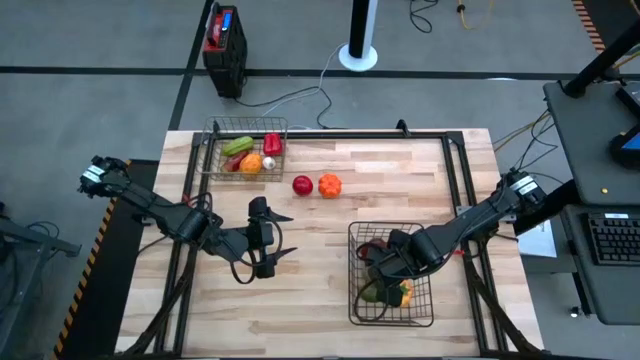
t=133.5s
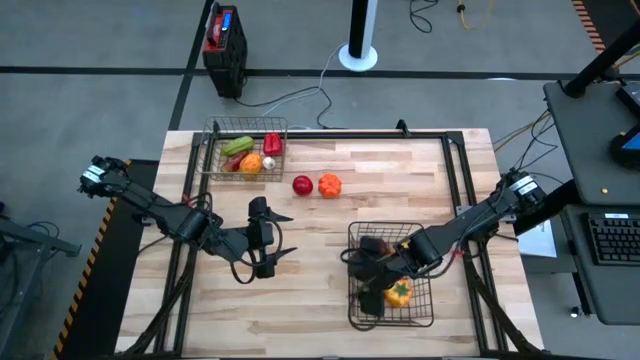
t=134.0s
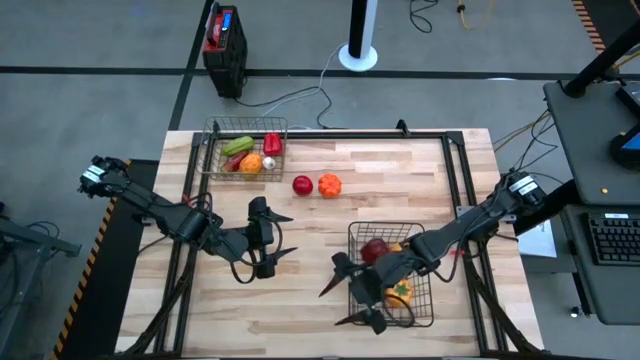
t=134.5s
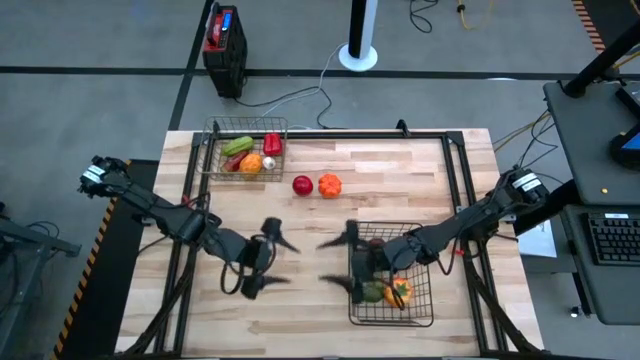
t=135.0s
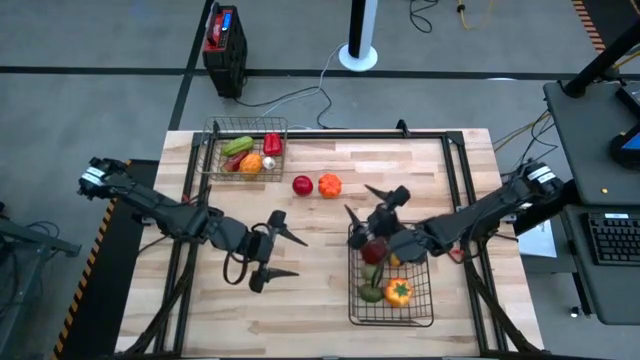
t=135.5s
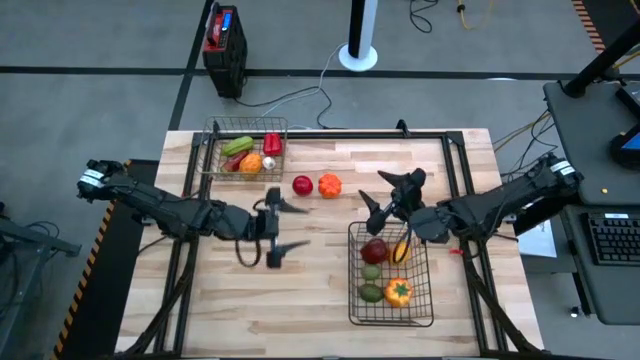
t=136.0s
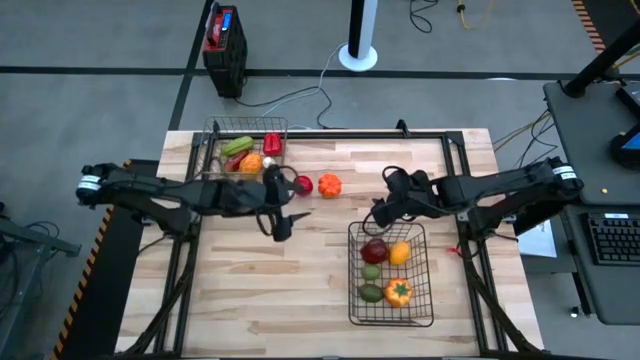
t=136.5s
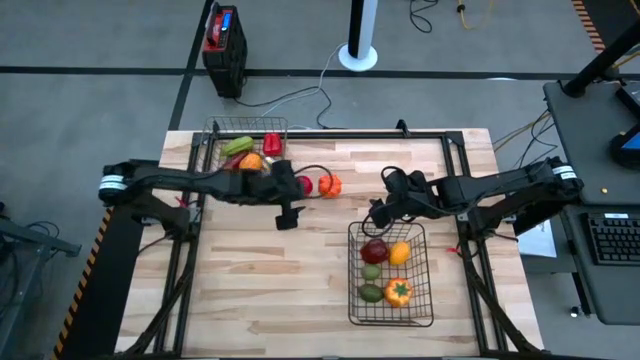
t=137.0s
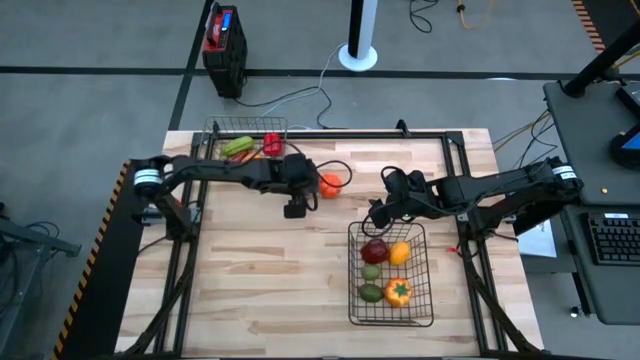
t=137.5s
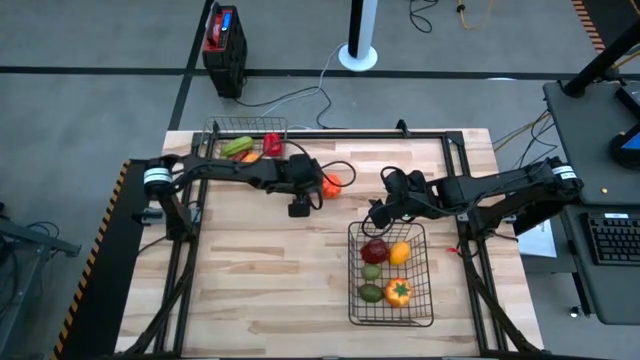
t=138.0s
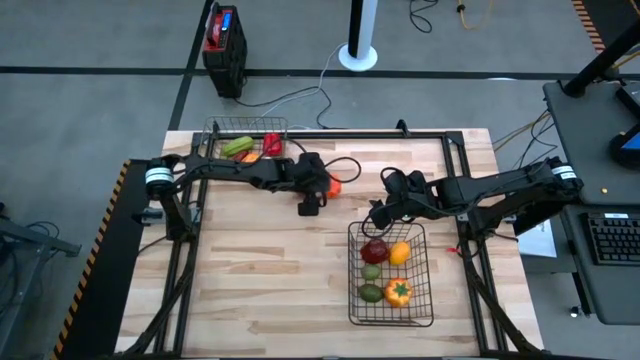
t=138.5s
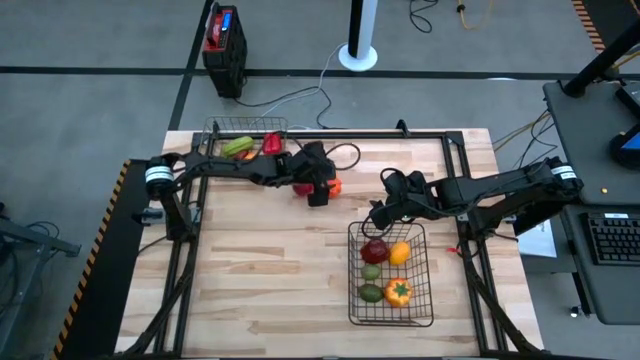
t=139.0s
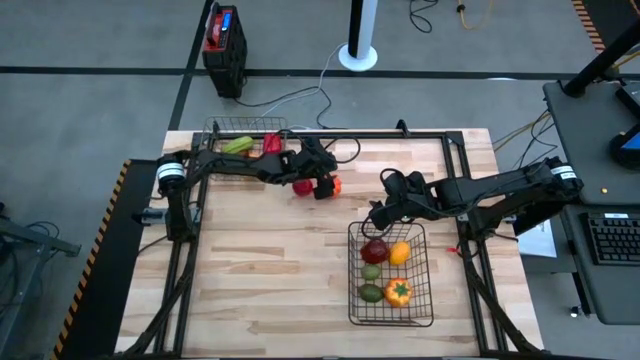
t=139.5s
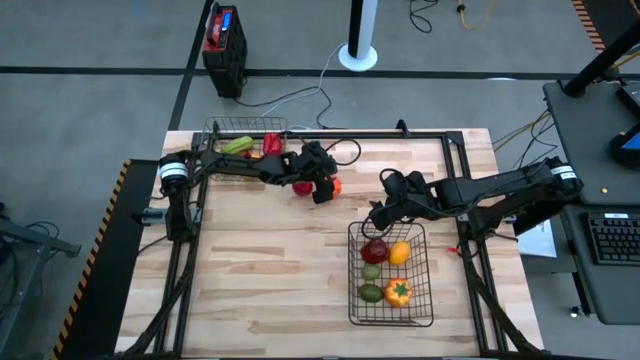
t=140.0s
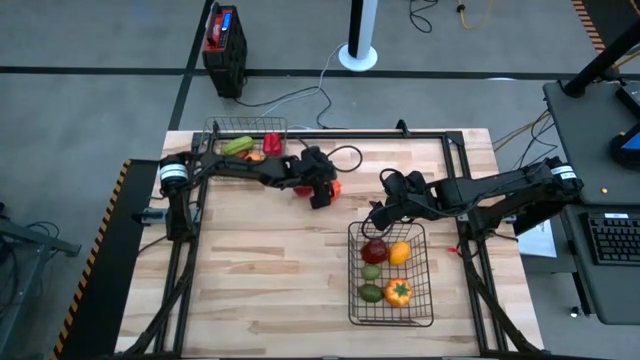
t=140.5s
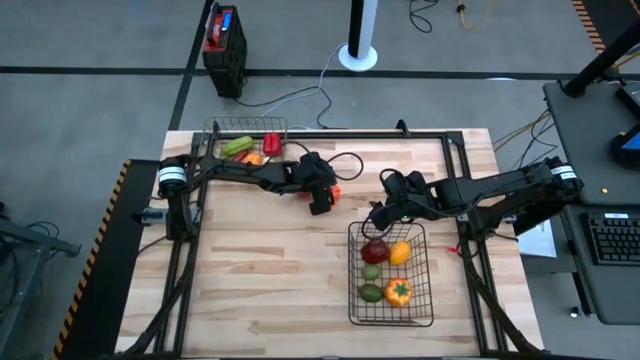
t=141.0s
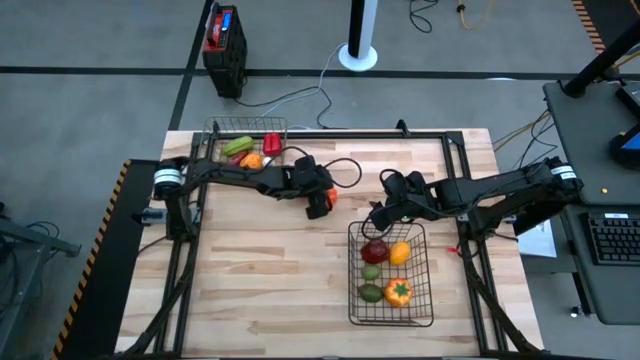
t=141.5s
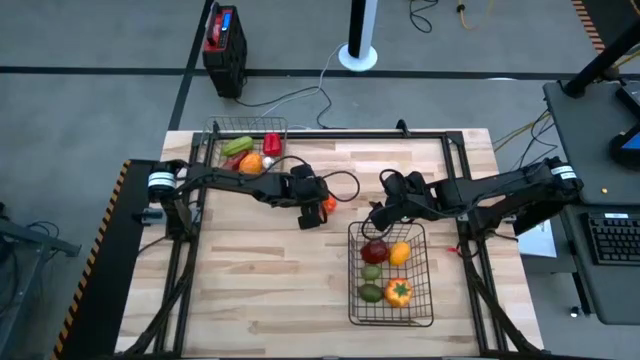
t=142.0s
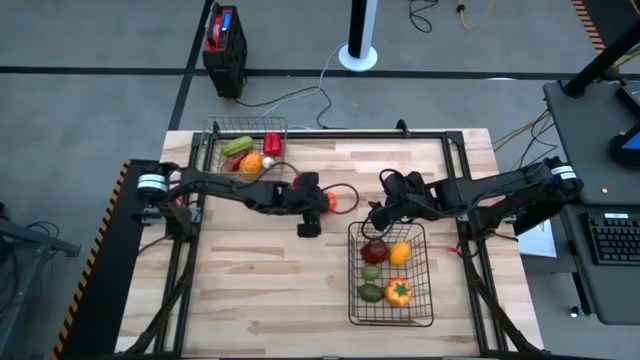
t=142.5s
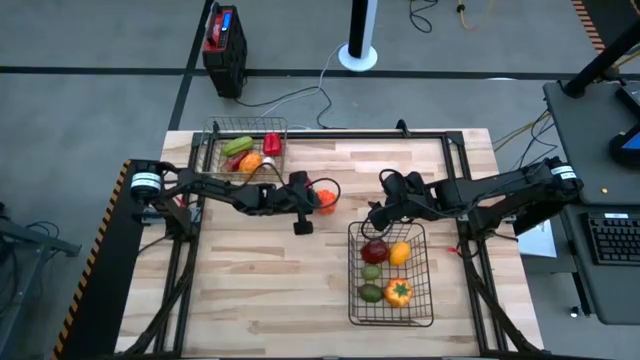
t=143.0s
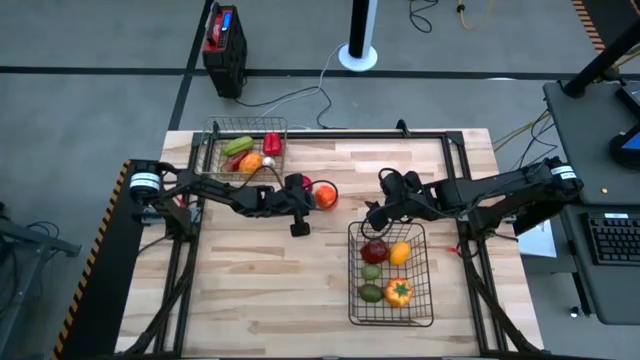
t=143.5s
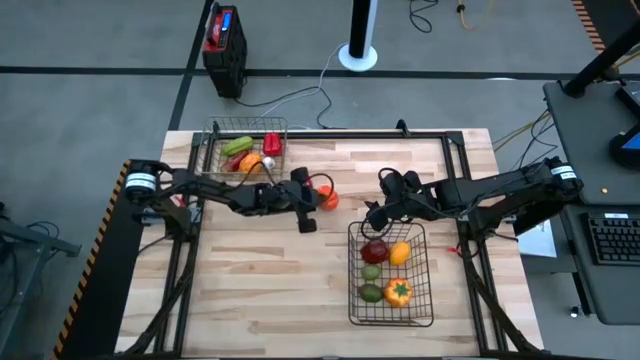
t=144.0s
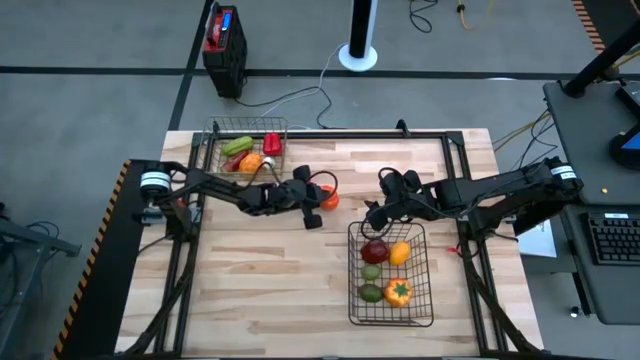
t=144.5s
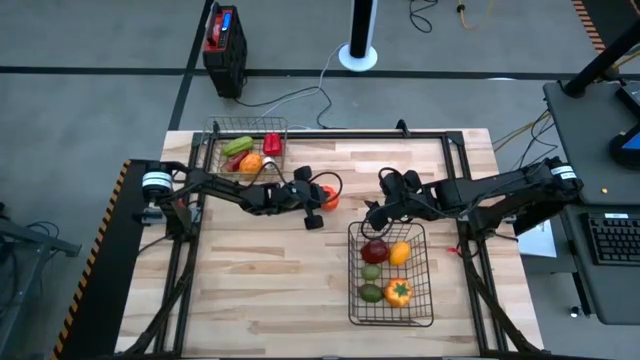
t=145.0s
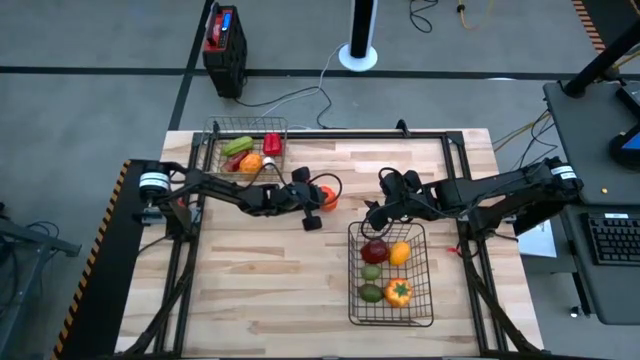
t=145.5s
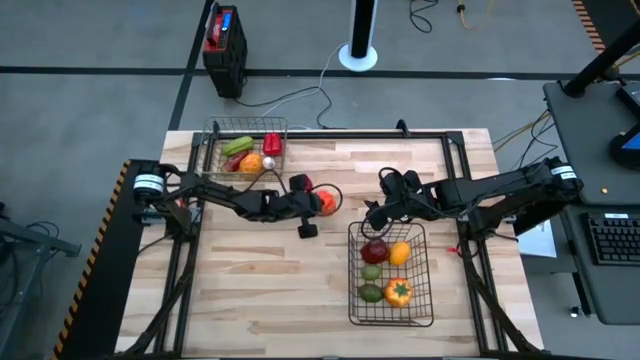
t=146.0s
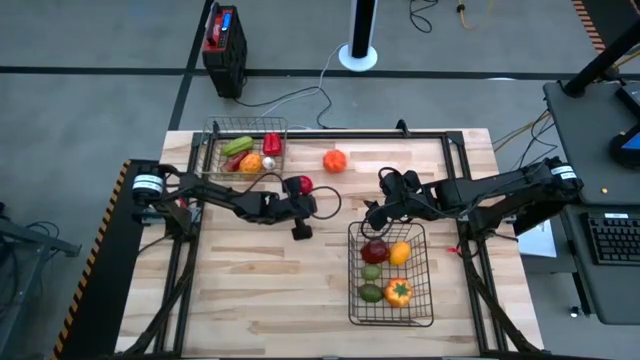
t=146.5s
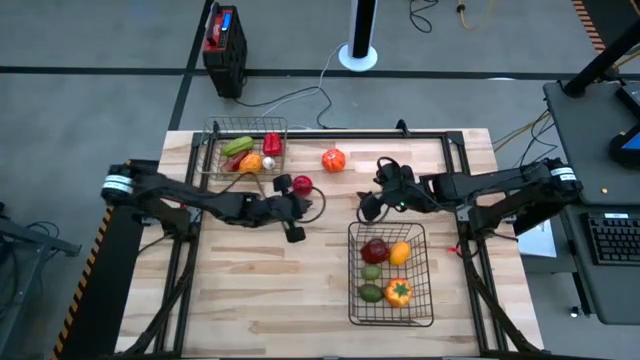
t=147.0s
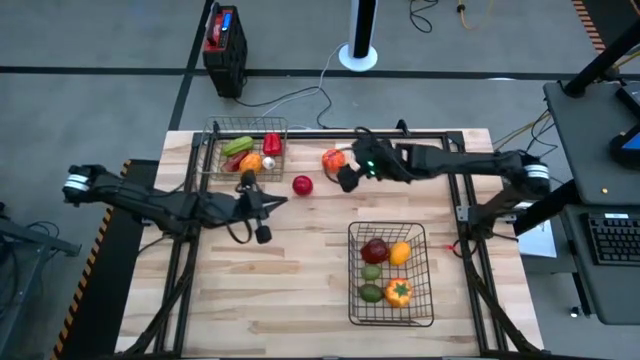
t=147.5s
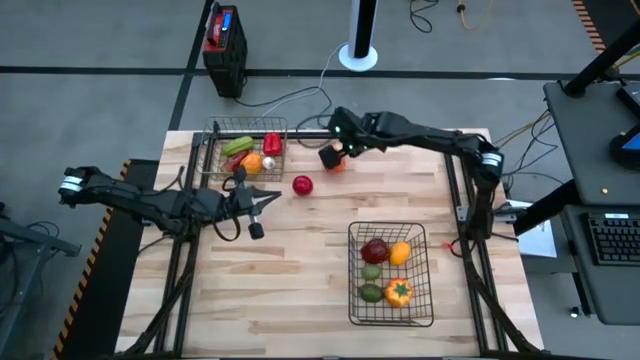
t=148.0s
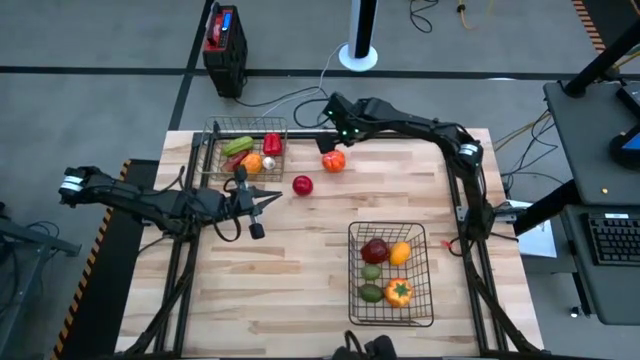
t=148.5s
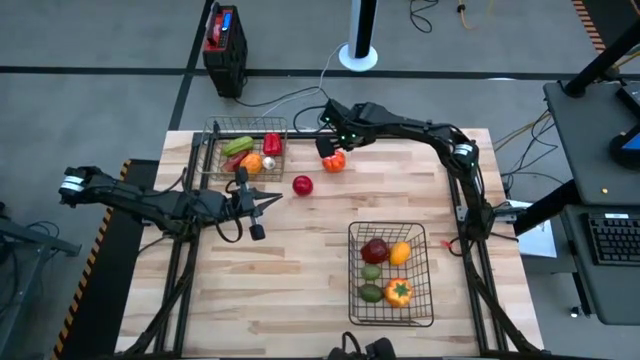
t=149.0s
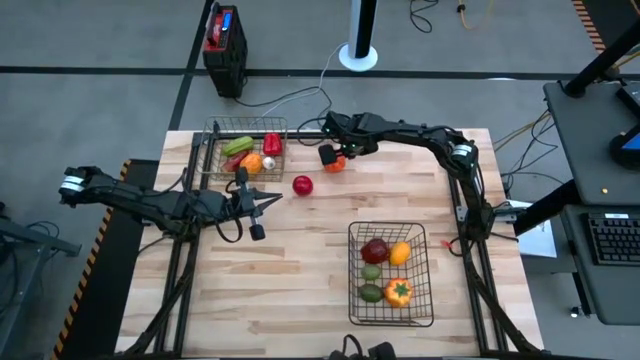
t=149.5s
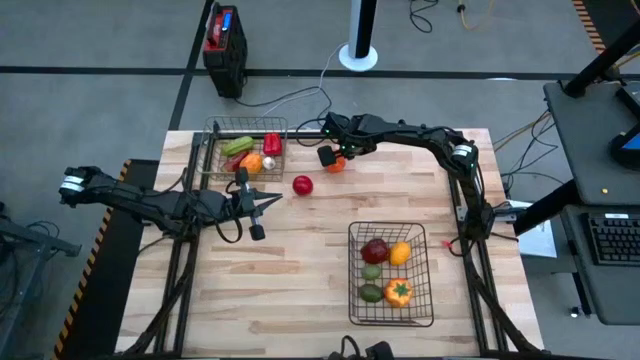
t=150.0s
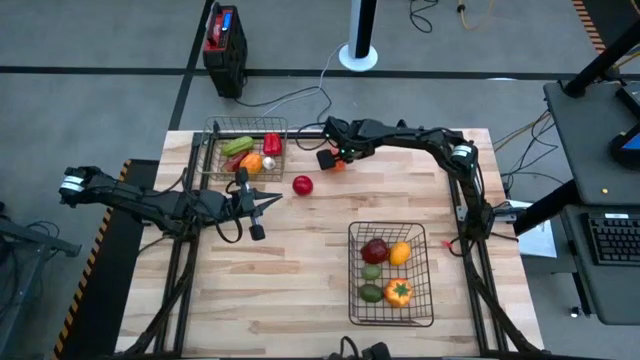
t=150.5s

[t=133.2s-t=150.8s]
Task: Sort produce into baskets
Put the orange pumpkin into the gold wire basket

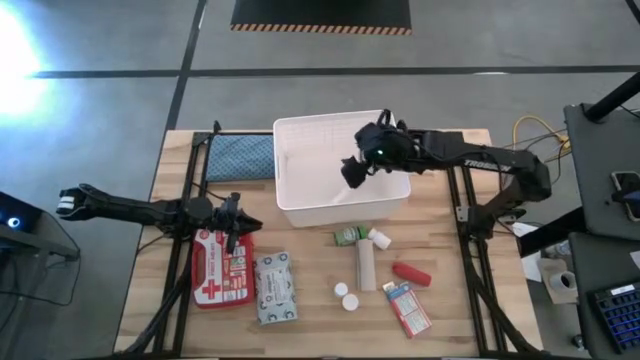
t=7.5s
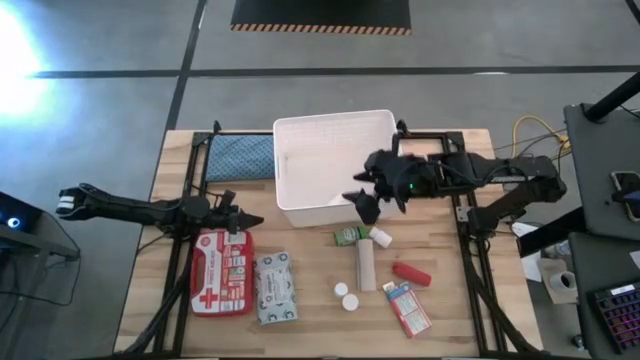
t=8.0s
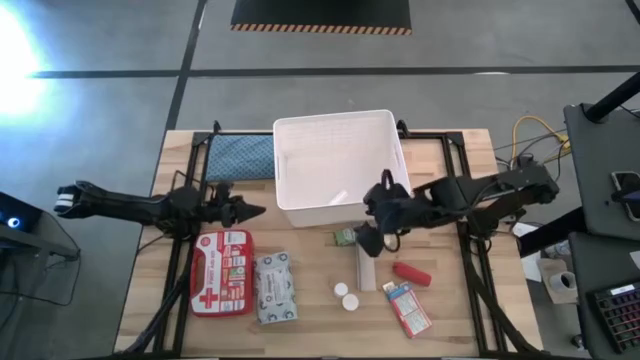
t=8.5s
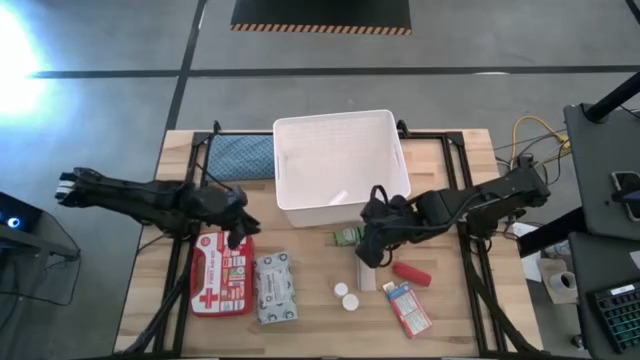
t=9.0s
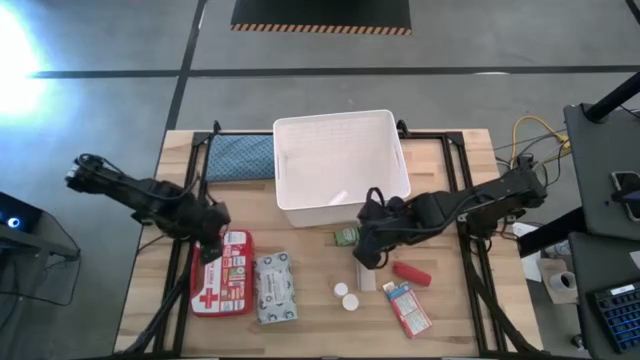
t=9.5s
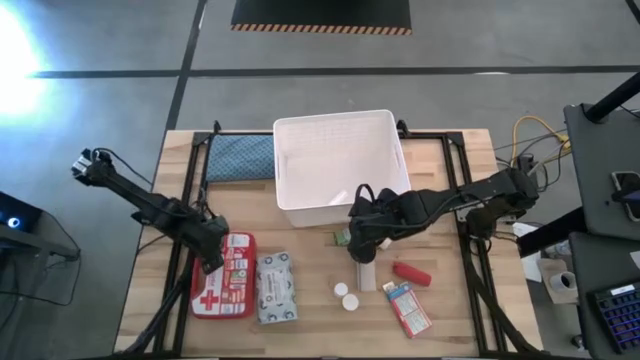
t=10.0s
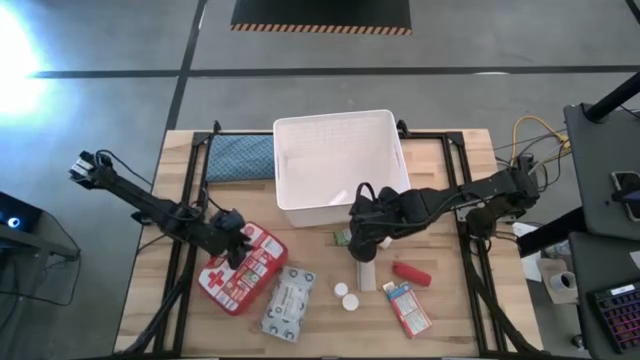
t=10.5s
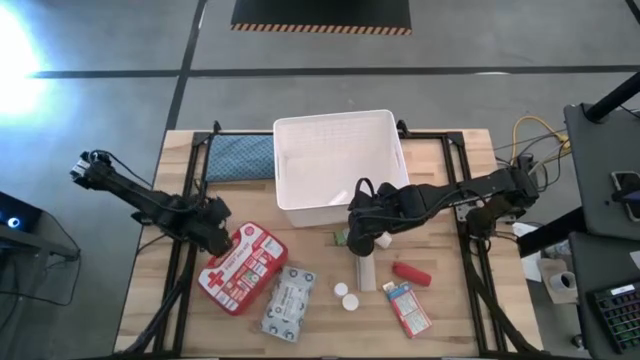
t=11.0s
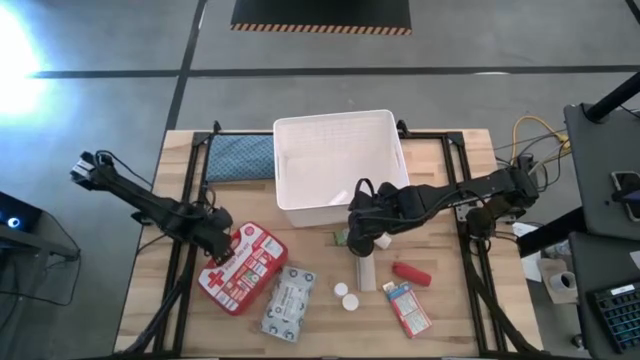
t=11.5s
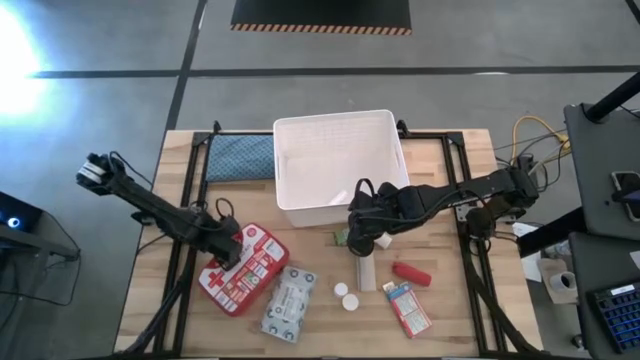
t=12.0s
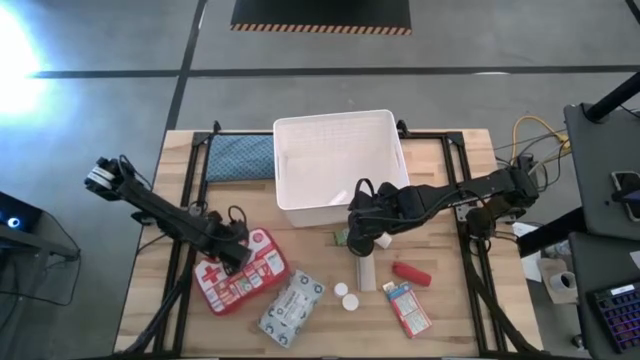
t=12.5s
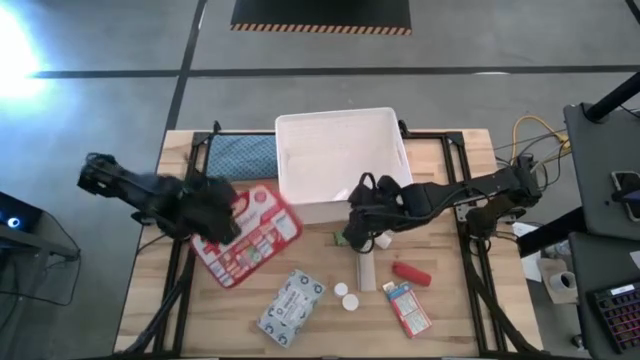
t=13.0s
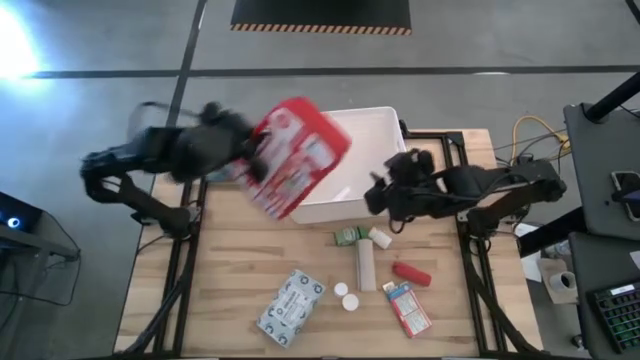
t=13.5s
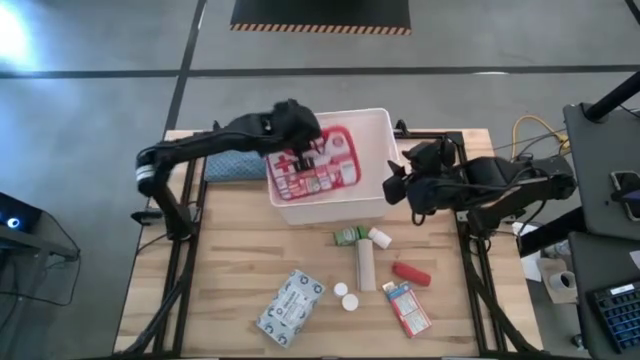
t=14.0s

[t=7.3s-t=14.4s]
Task: Pick & place medical supplies in basket/bin
Put the red first aid kit into the bin
